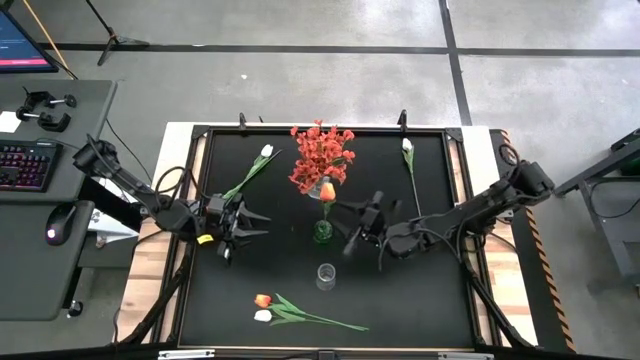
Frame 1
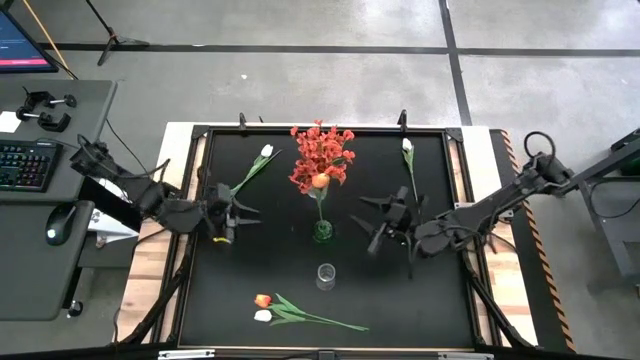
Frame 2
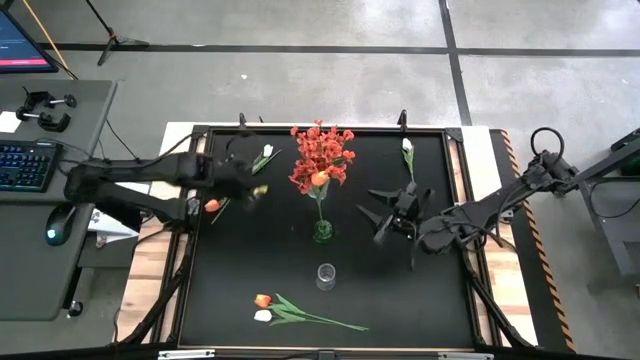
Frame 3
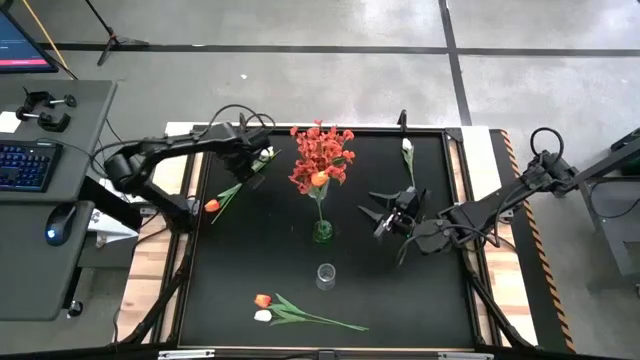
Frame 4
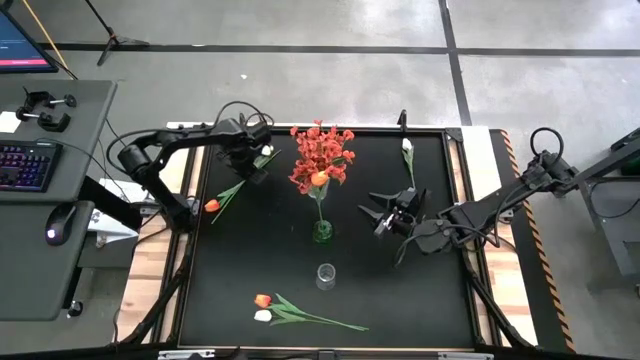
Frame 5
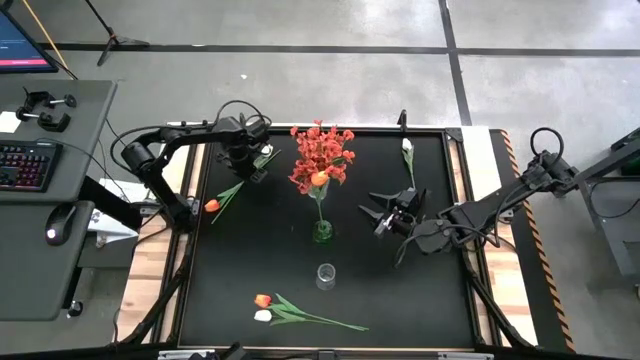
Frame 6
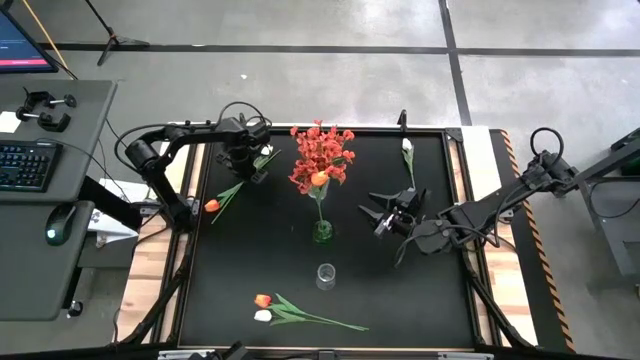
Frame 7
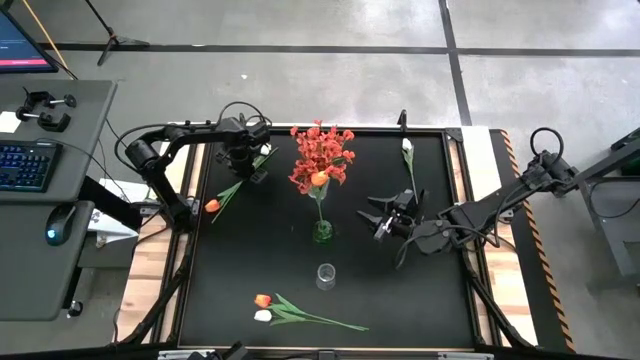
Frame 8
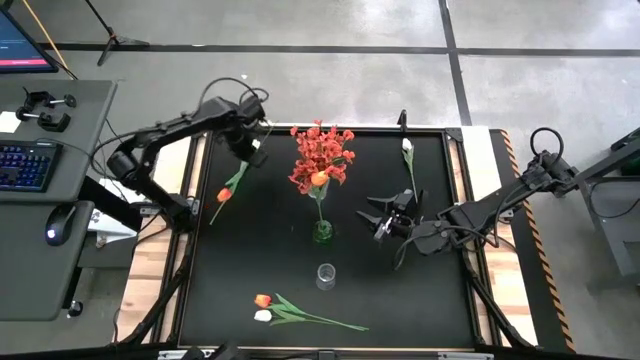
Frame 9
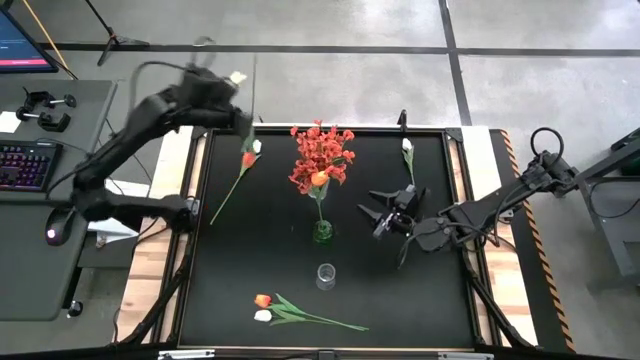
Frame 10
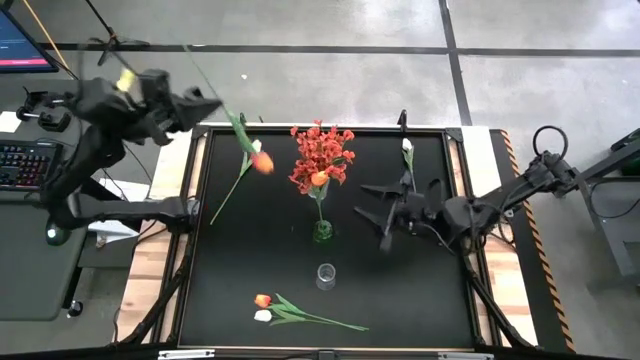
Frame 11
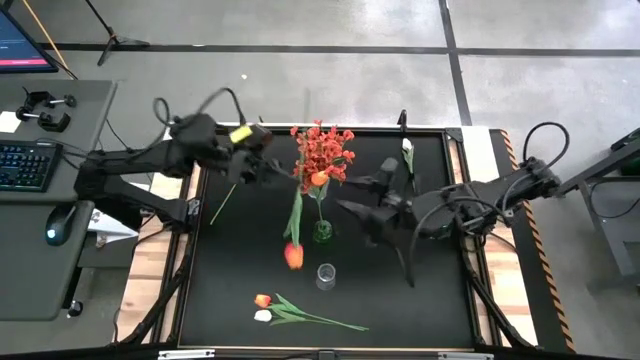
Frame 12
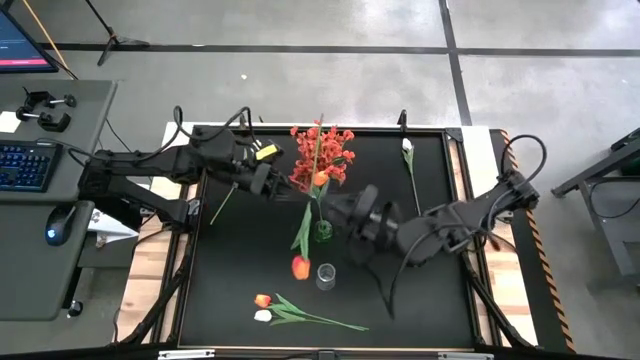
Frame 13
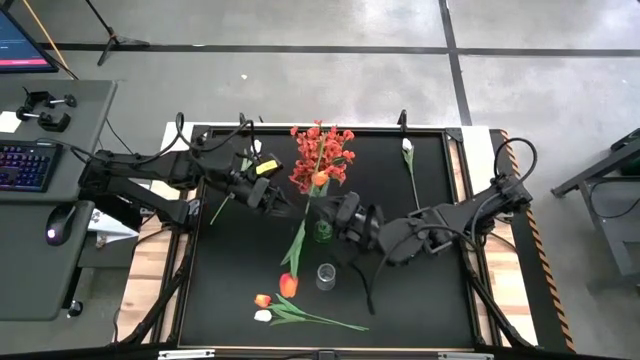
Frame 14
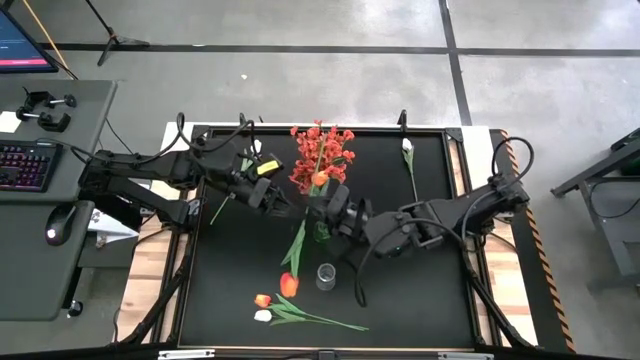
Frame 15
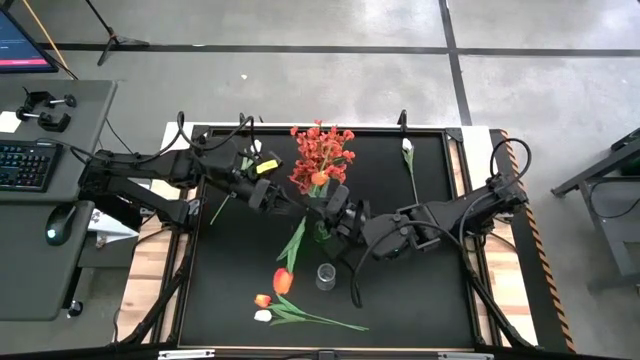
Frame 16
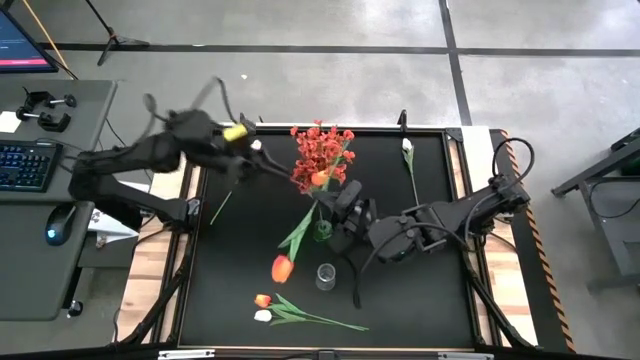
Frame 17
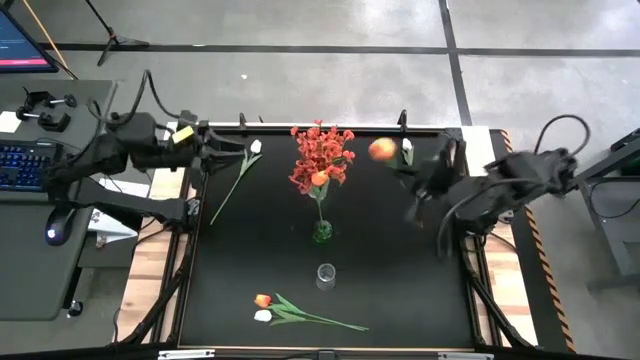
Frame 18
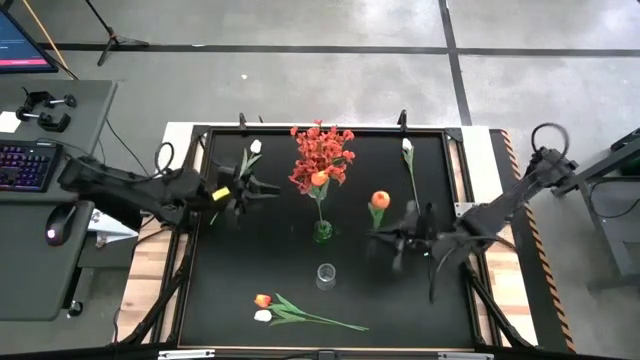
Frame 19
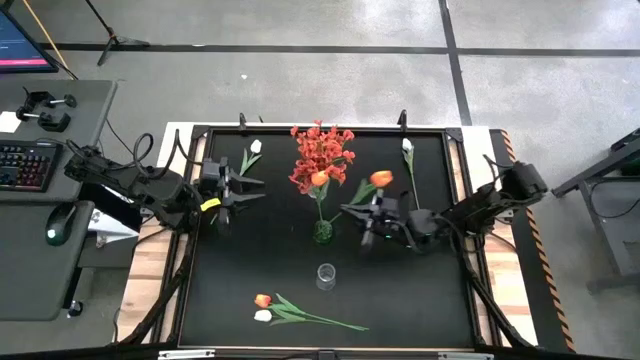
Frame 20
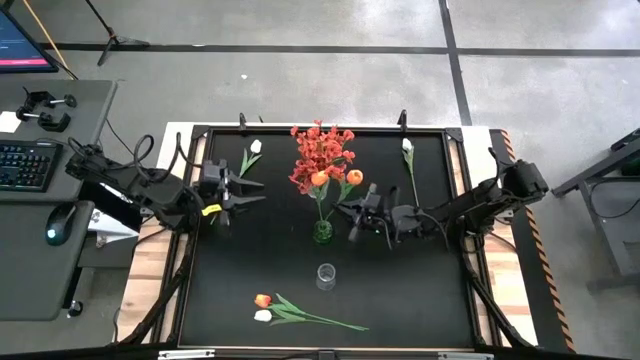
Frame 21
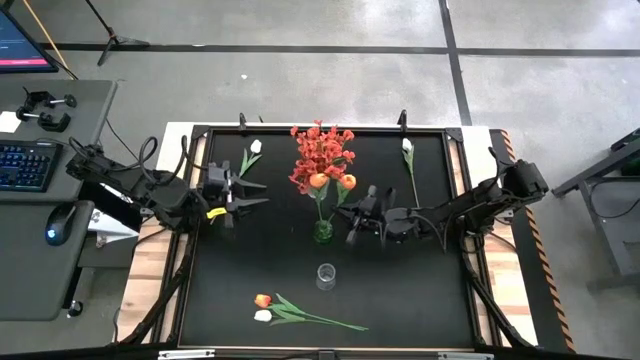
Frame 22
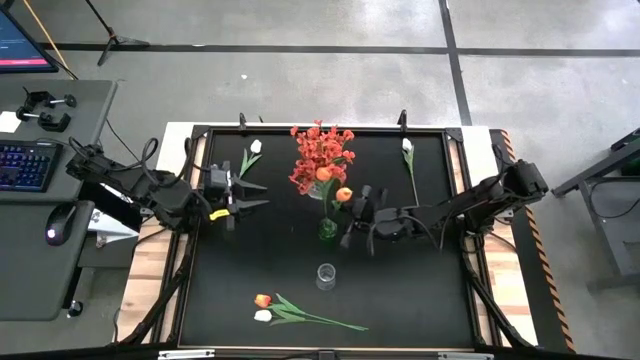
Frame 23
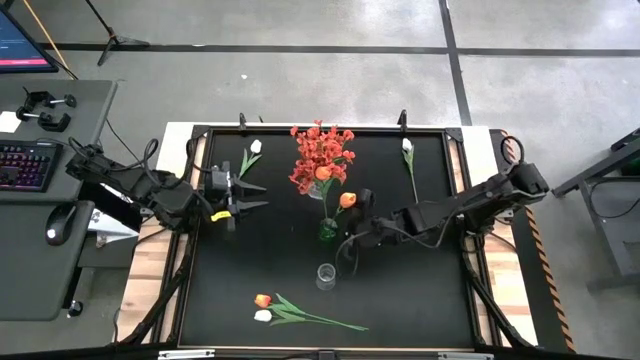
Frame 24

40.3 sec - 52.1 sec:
Task: Sort flowers into vase by color
Put the top orange tulip into the green flower vase

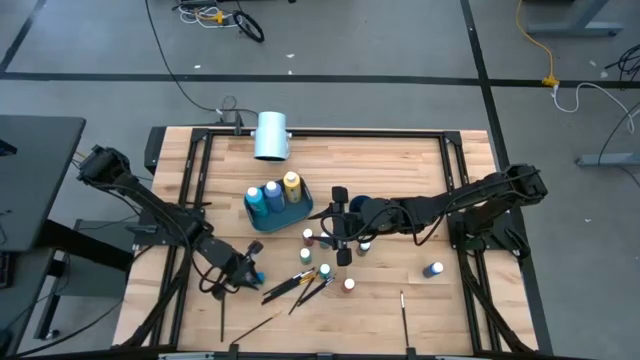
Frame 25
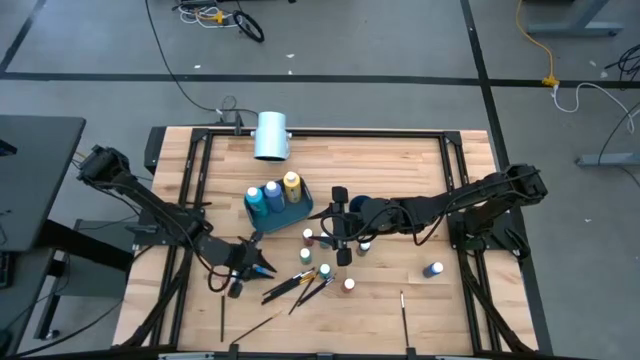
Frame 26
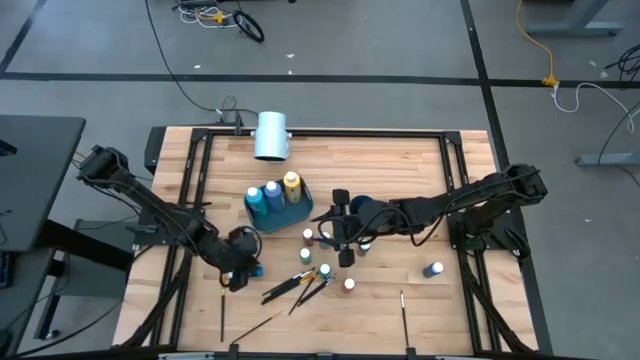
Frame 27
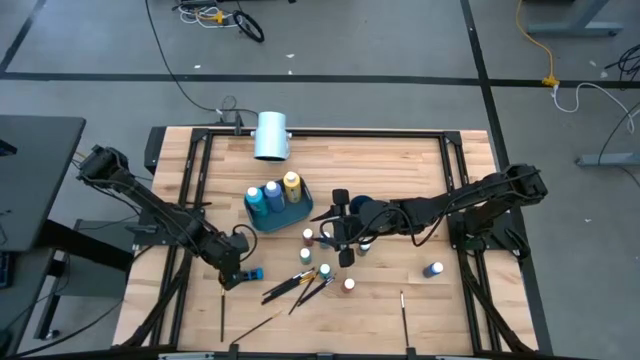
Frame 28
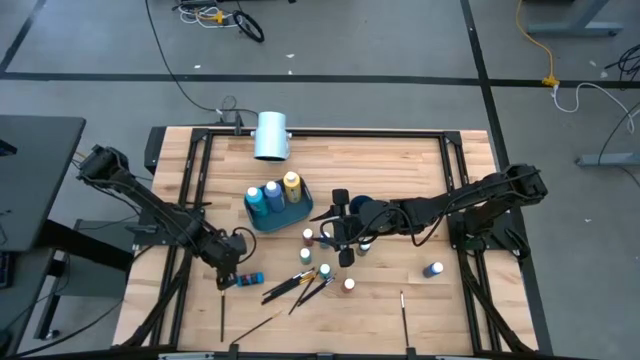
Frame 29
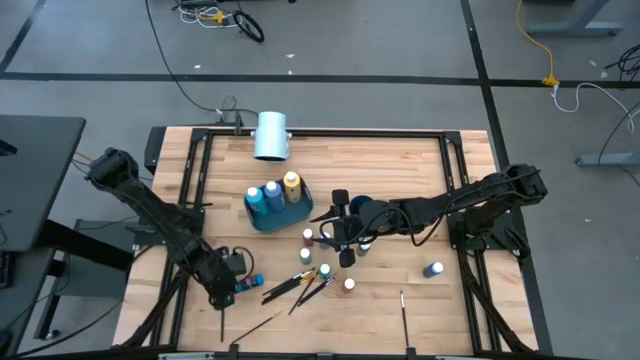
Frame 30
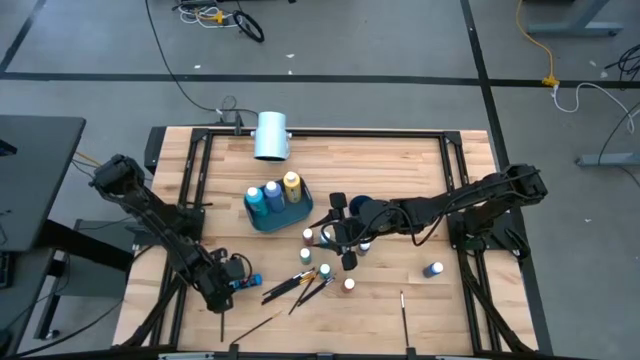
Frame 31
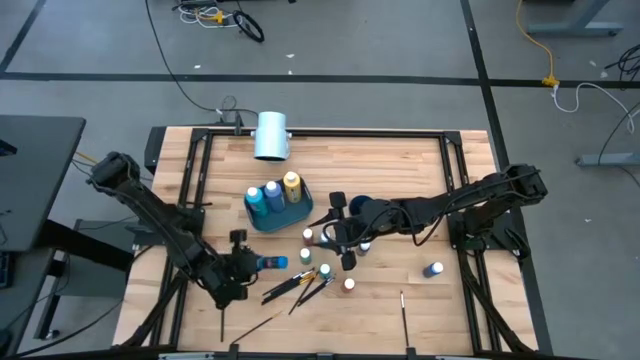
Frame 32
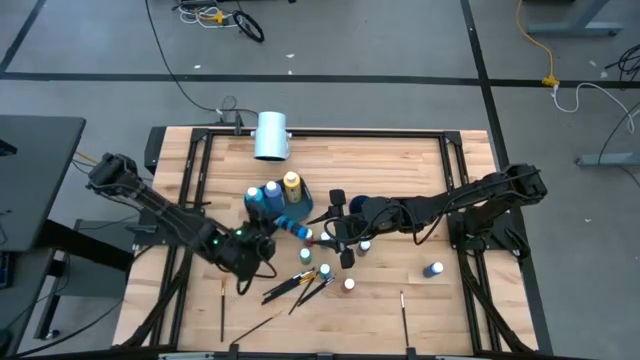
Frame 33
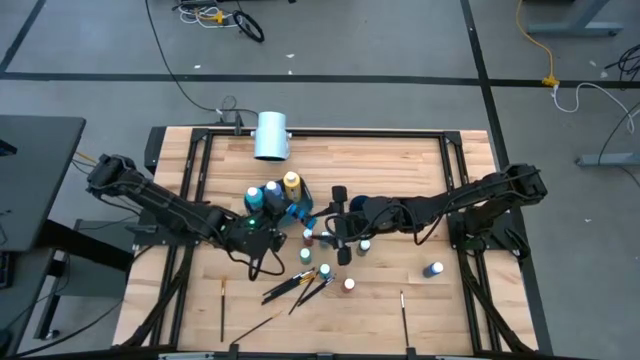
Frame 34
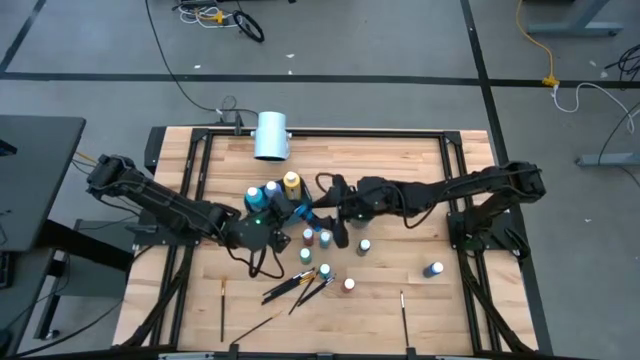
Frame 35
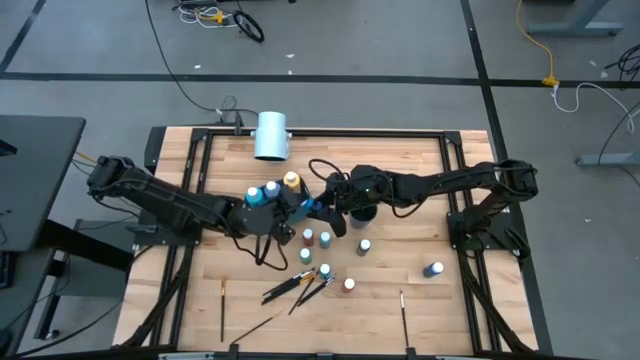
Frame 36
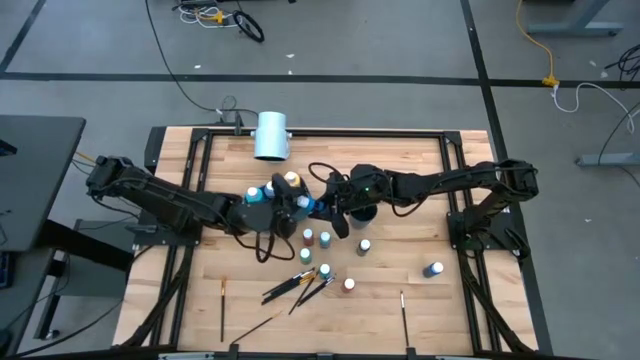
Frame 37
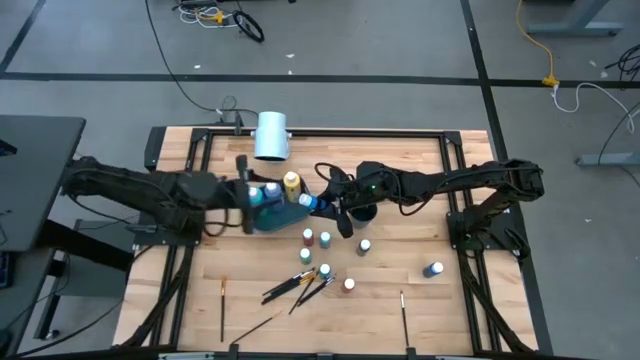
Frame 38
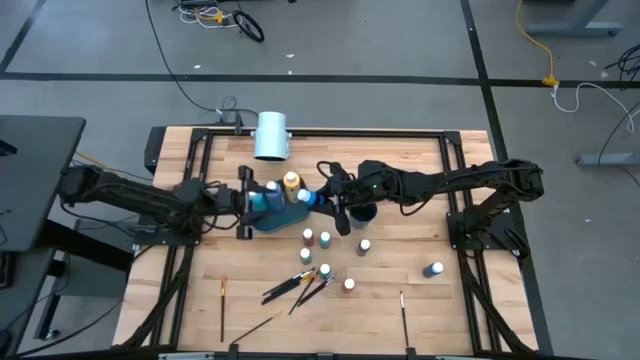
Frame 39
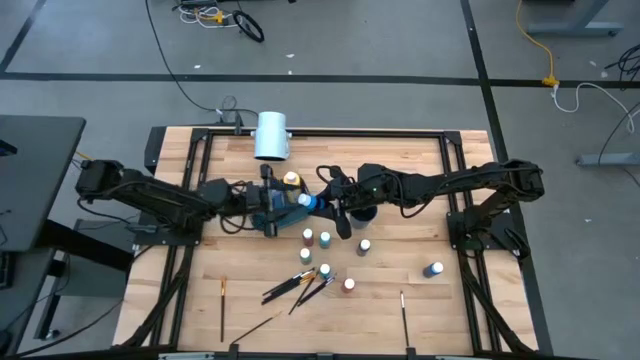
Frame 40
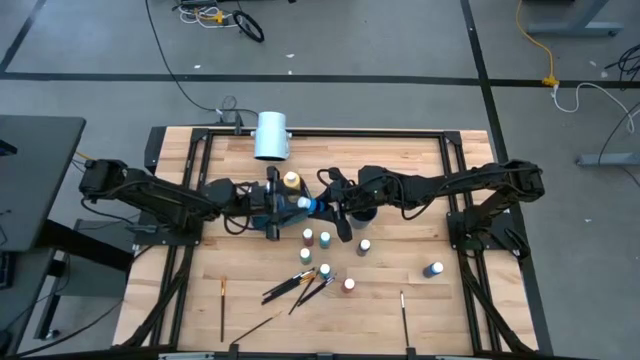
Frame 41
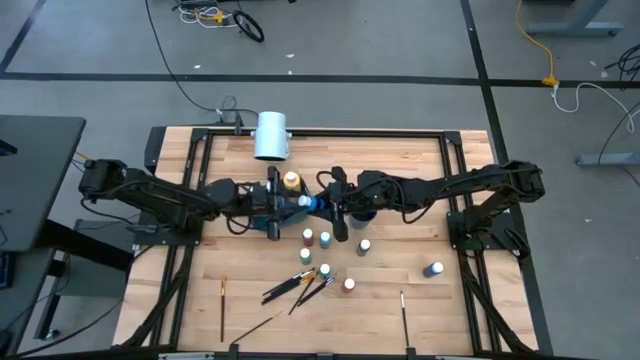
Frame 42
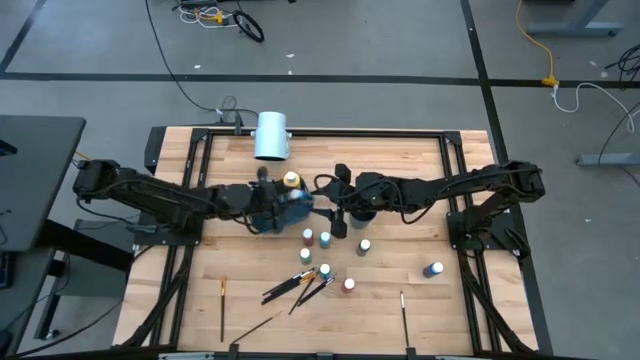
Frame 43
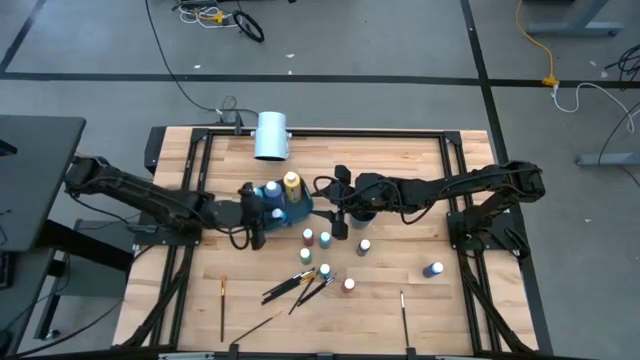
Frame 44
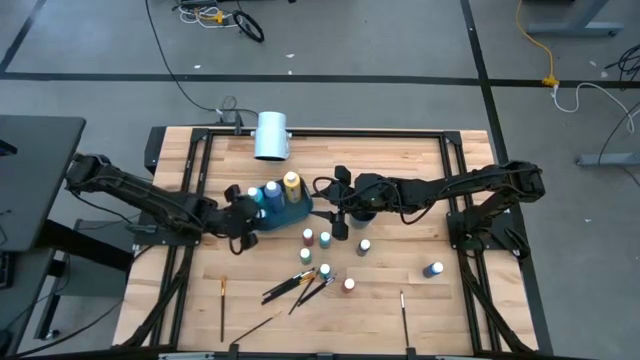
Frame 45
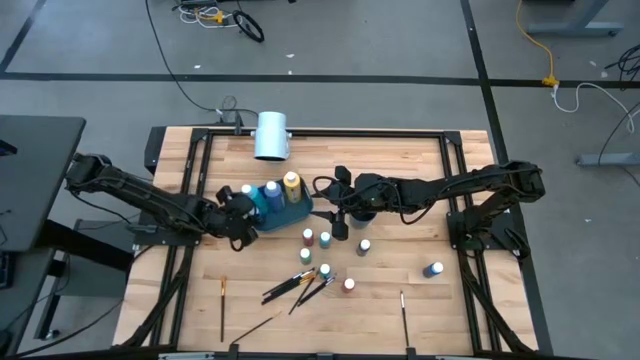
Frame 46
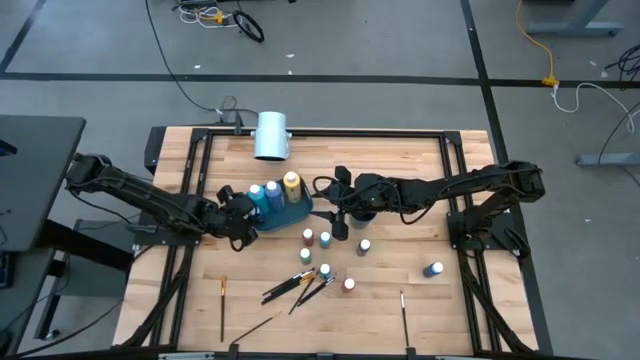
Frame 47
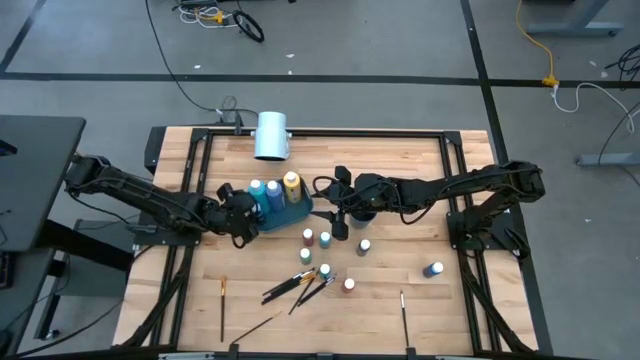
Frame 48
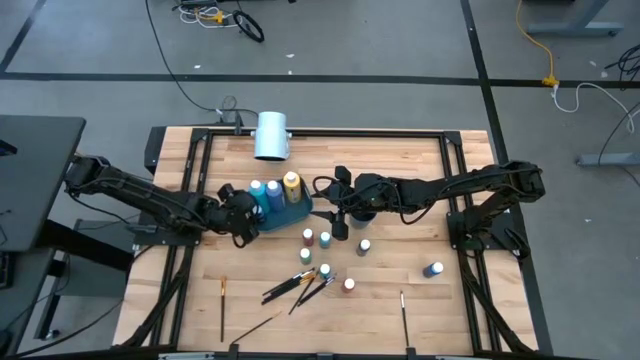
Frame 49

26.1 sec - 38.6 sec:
Task: Pick & Place Paint Supplies
Put the small blue paint bottle into the blue bin
